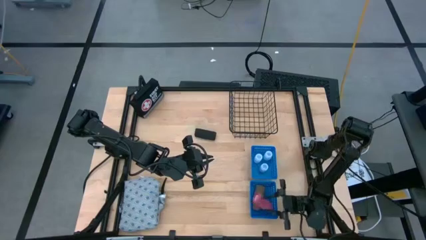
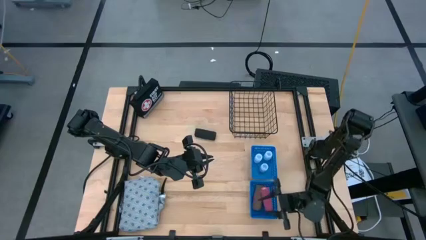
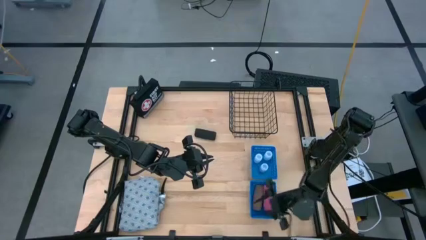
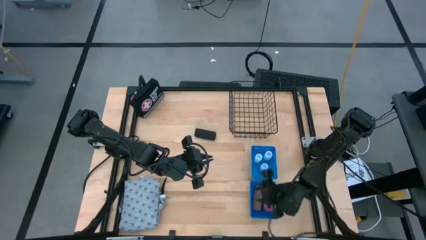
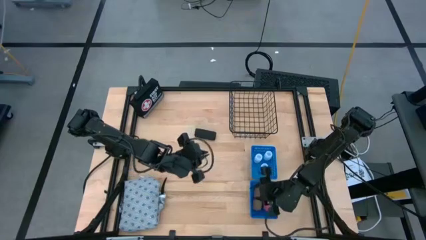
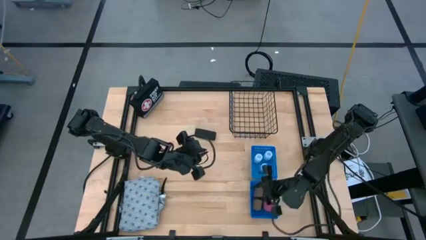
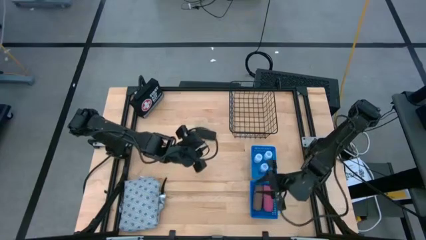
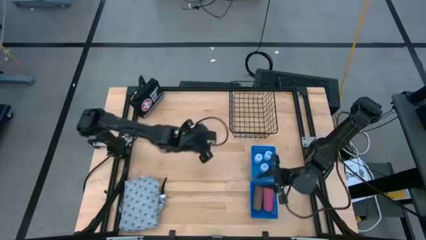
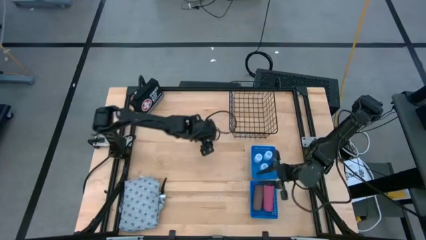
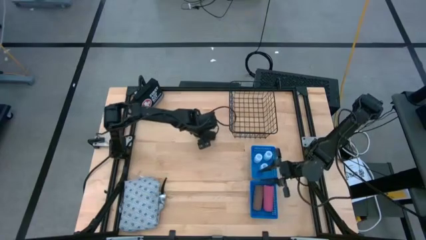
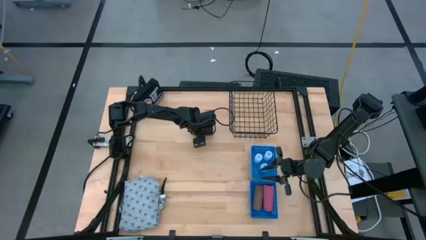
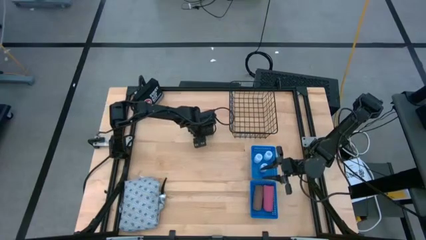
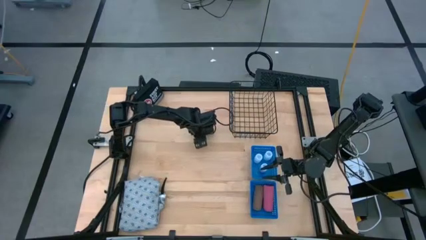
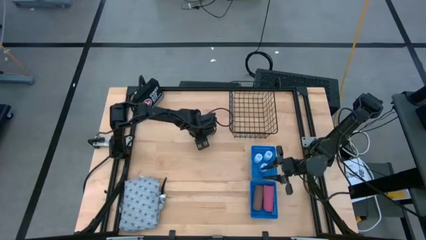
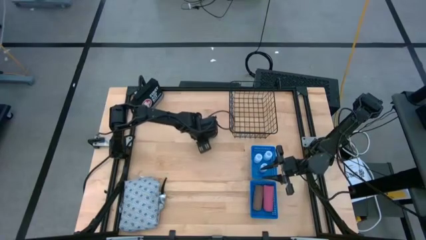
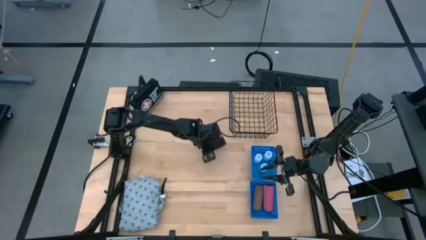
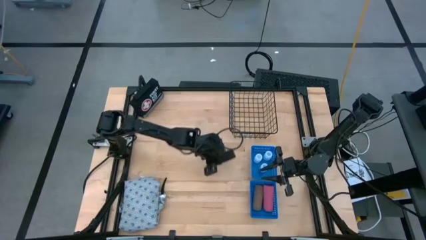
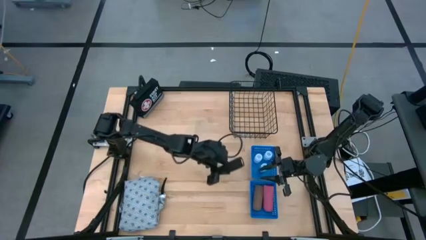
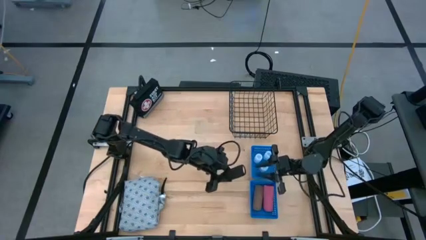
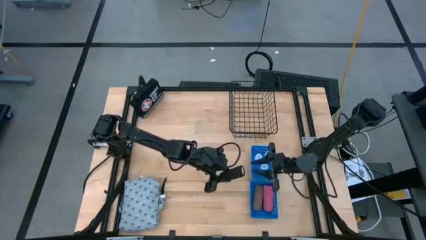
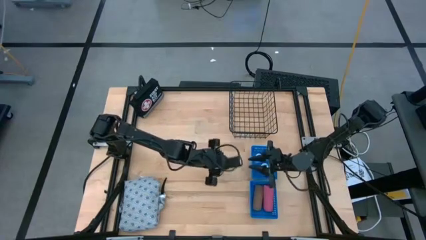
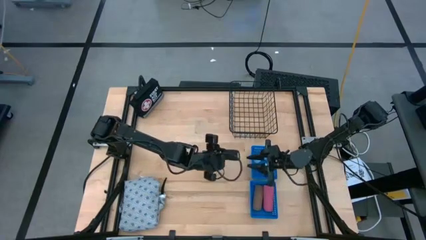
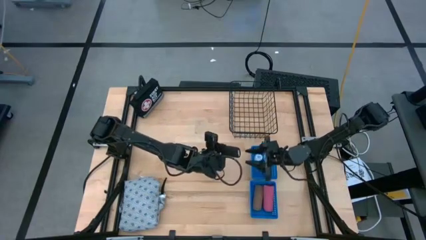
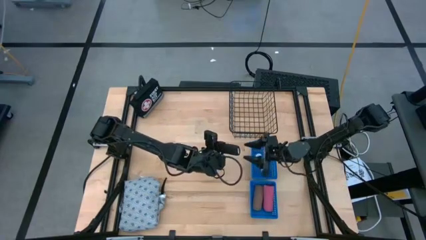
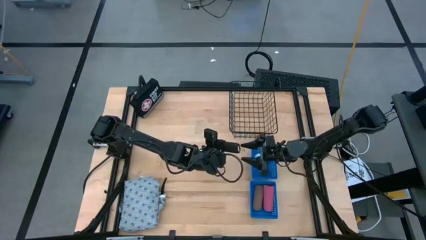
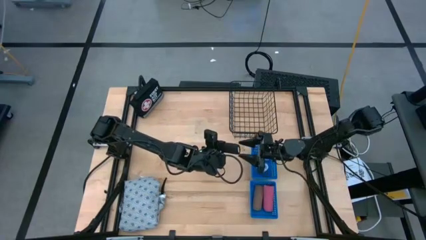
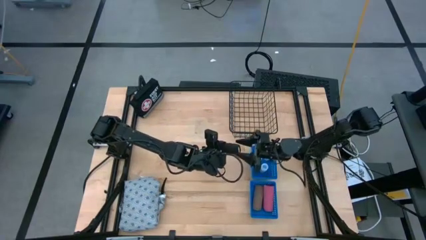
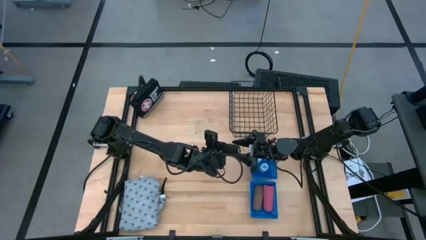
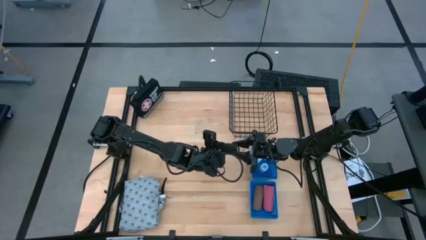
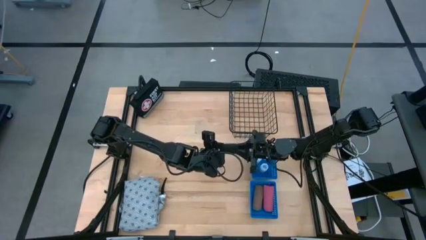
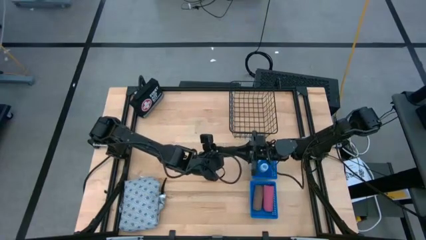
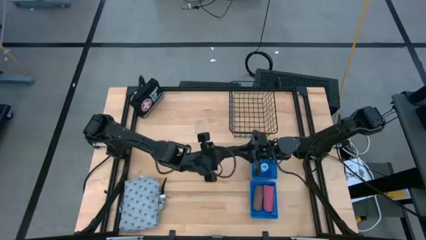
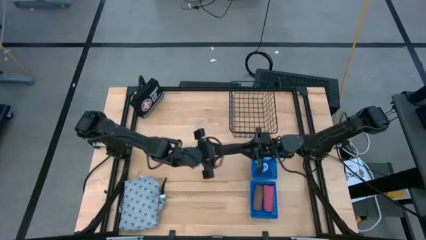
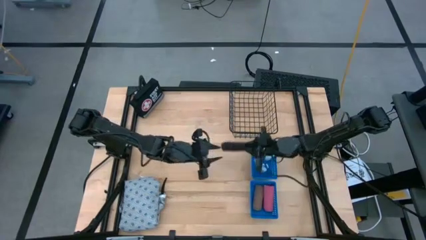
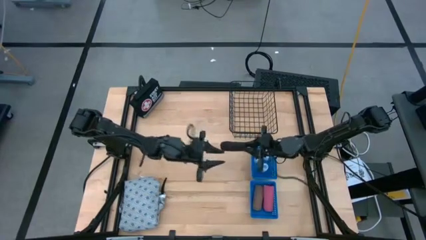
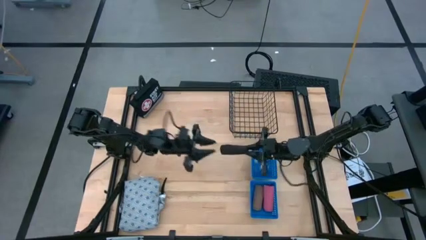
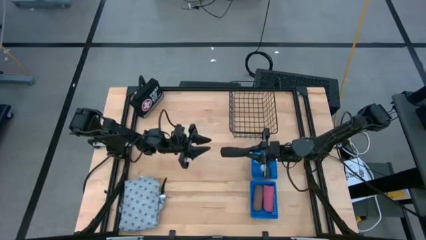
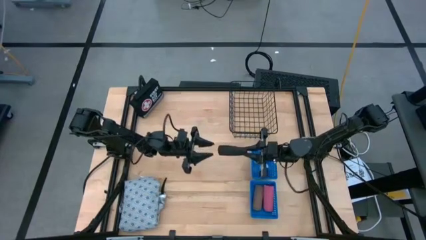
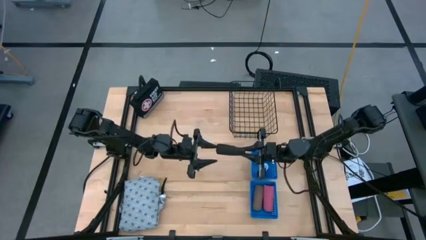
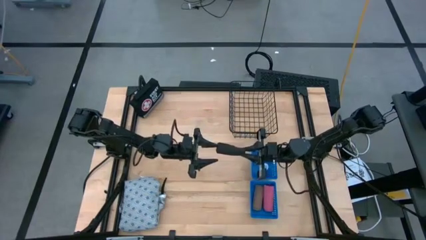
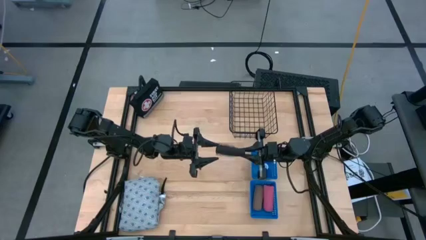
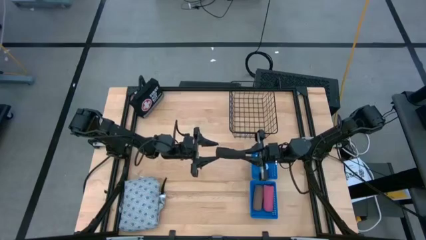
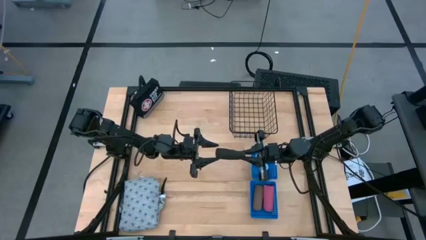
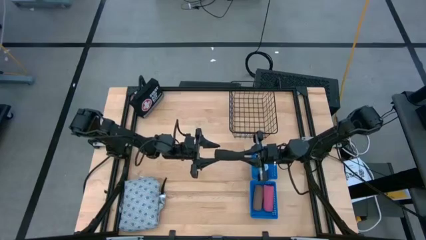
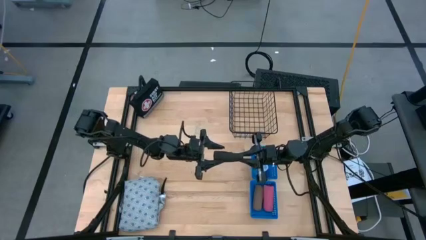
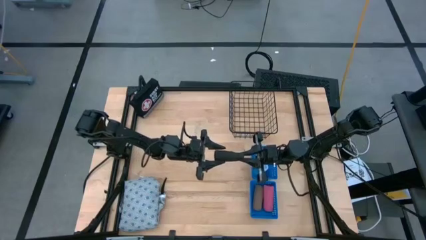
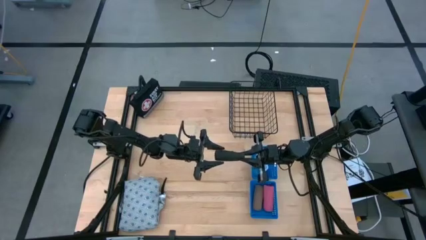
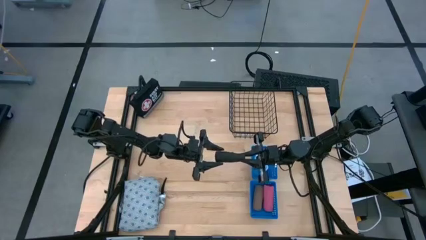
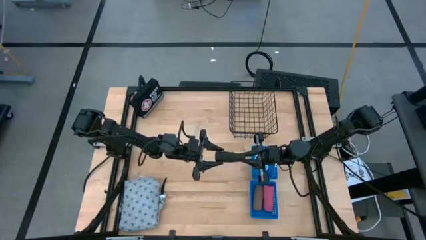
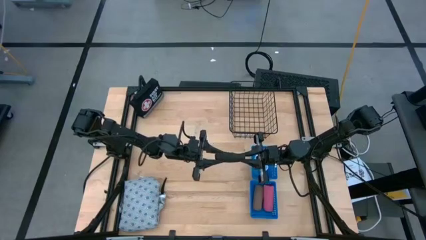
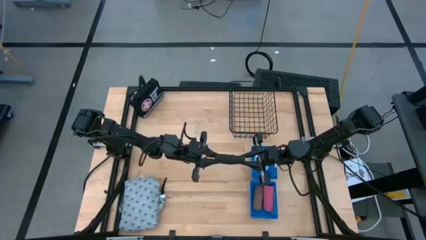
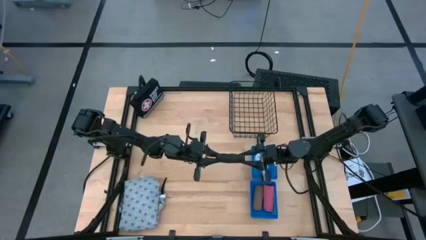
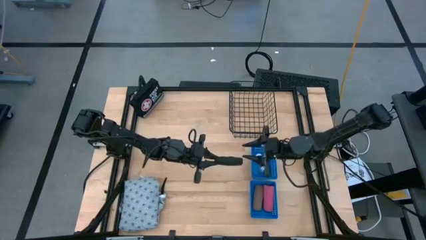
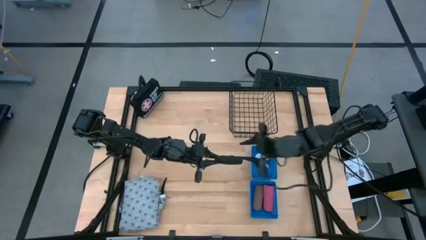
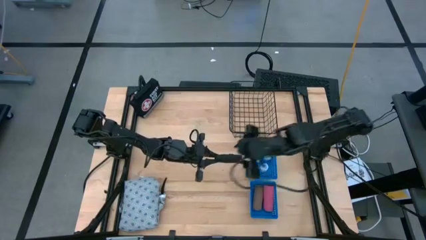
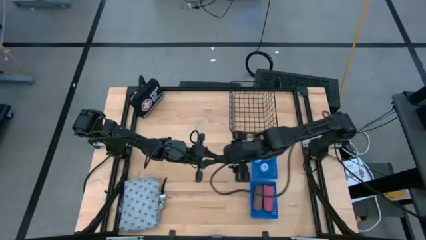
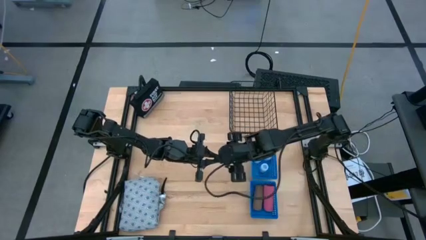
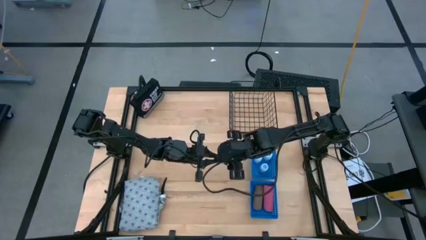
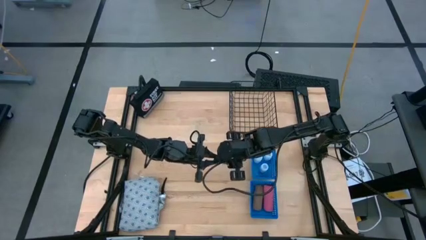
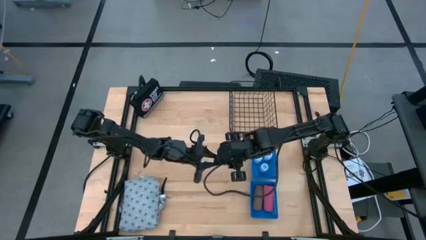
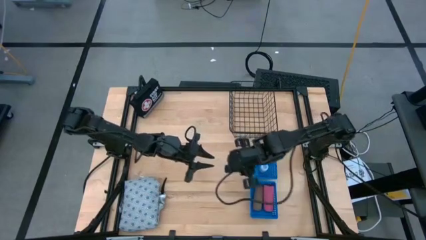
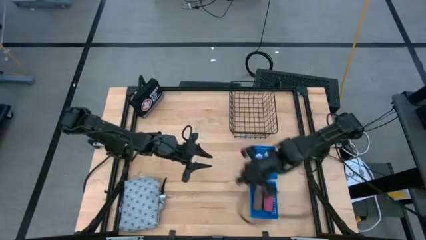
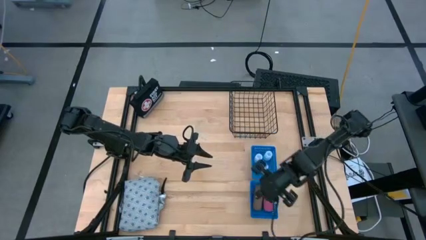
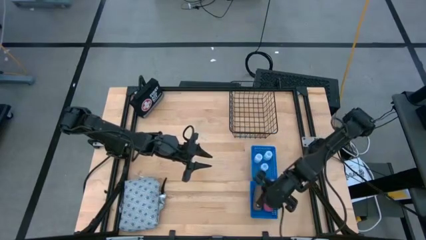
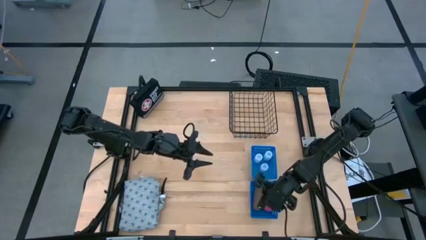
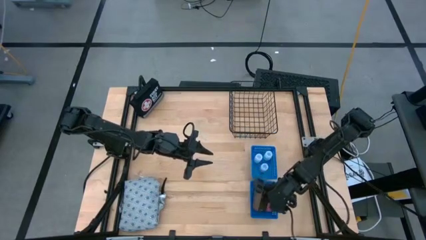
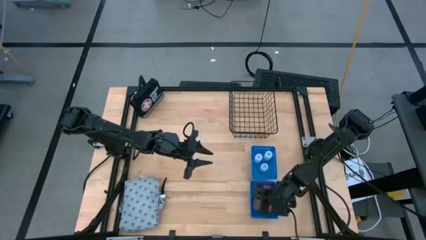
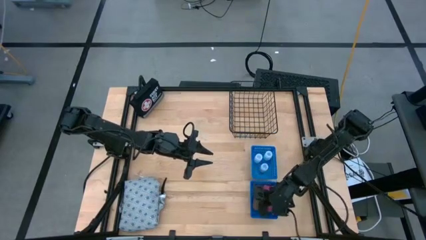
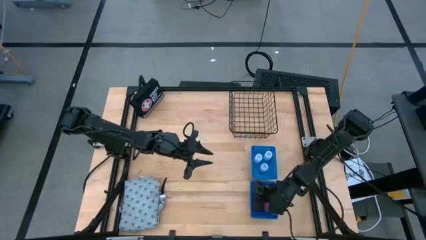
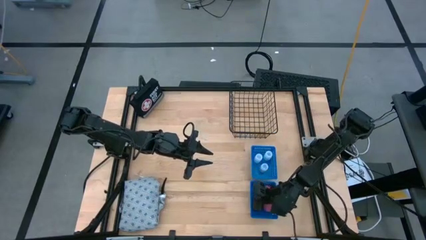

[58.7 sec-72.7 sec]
Task: Pick & Place Medicine items
Put the black bandage into the bottom blue basket

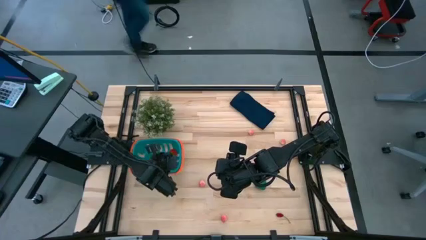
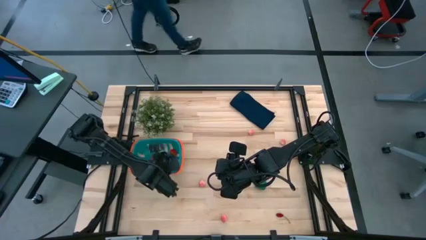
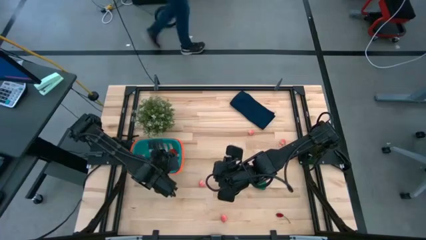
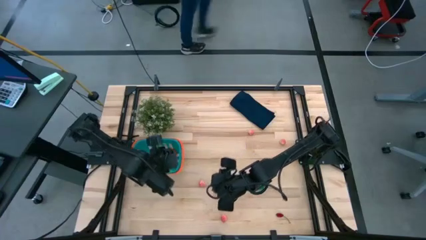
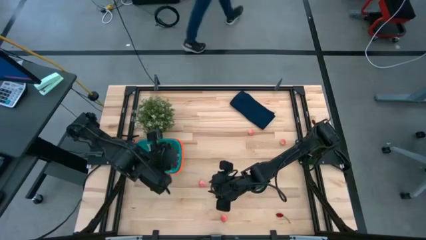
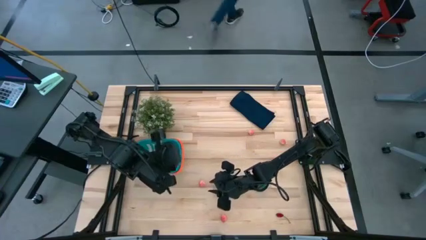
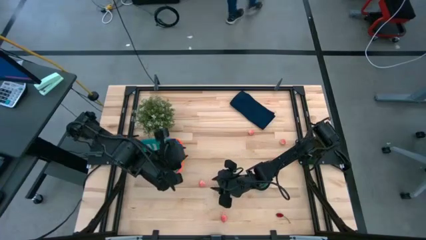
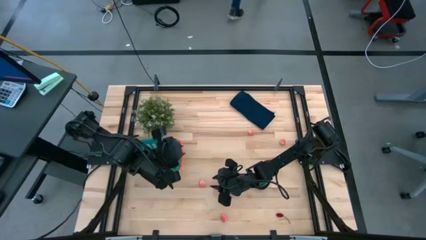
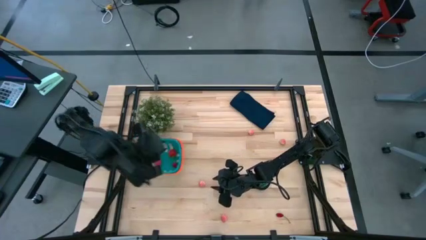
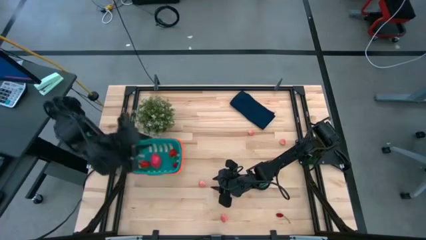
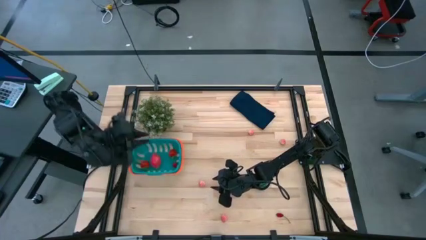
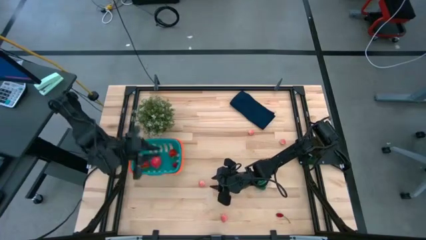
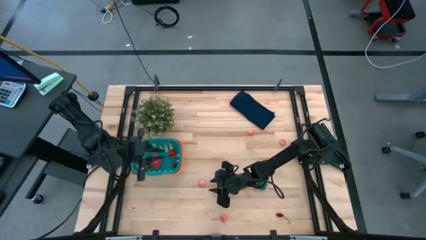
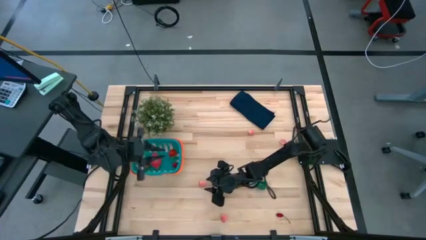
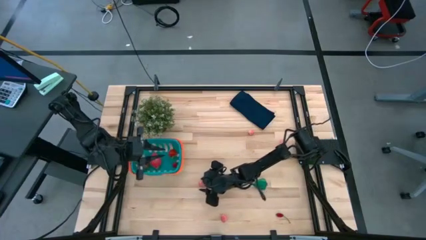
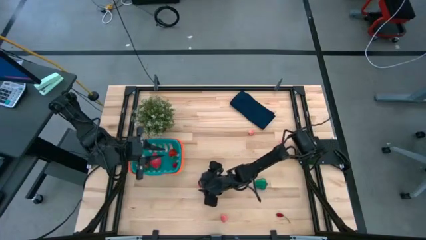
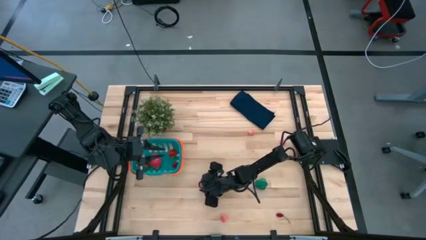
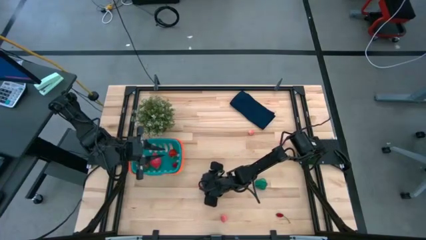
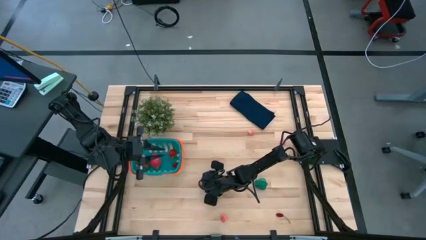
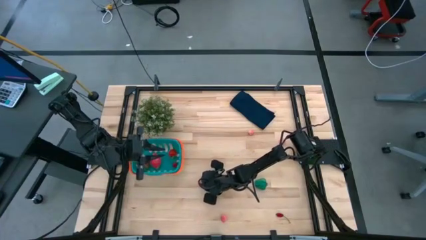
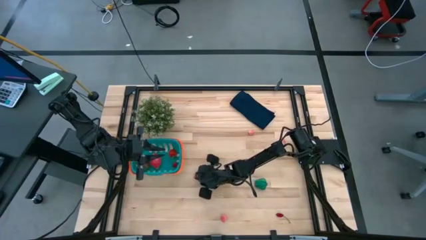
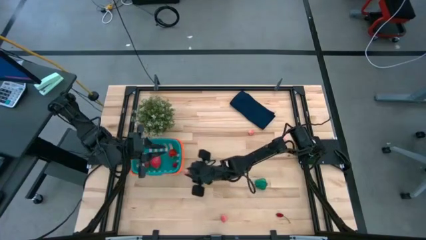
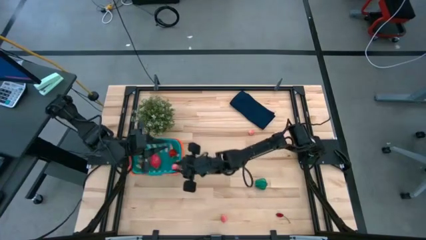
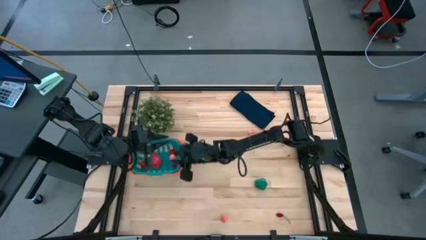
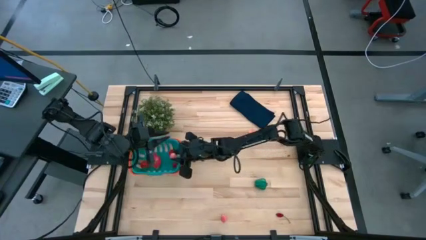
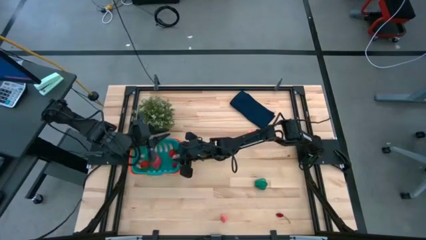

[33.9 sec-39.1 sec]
Task: Pick and placing Produce into tupperware
Put the peach into the green basket
